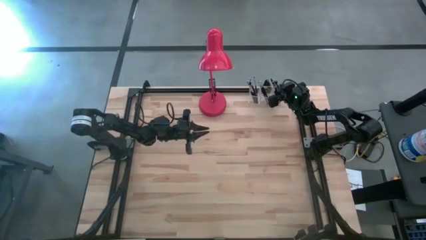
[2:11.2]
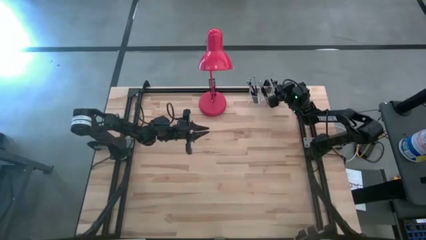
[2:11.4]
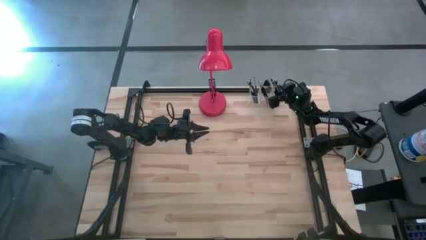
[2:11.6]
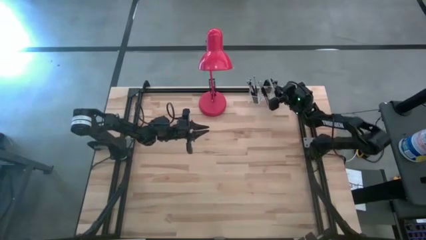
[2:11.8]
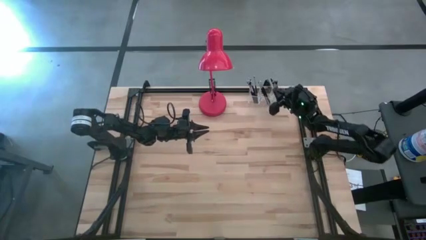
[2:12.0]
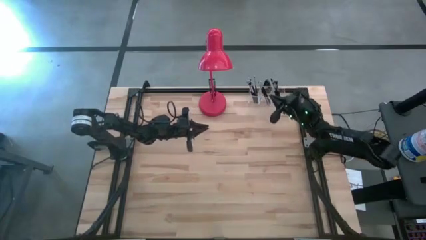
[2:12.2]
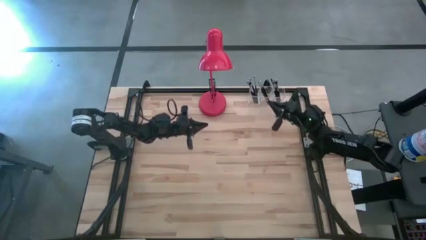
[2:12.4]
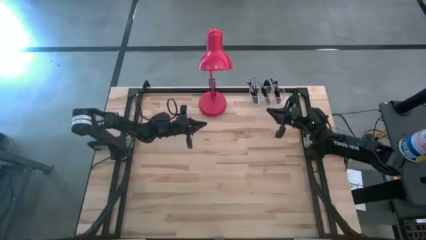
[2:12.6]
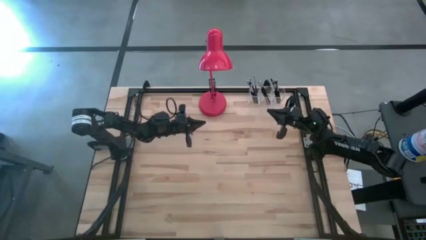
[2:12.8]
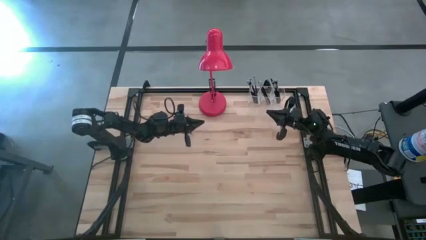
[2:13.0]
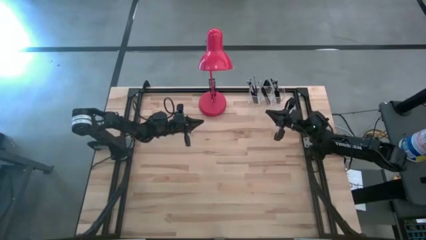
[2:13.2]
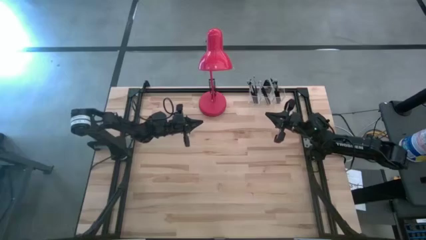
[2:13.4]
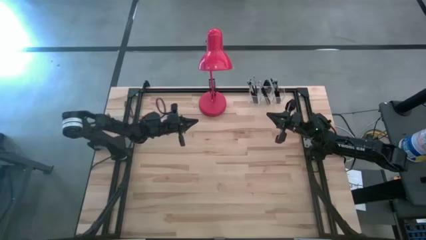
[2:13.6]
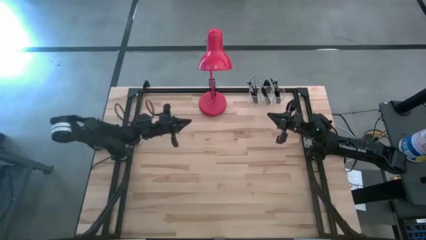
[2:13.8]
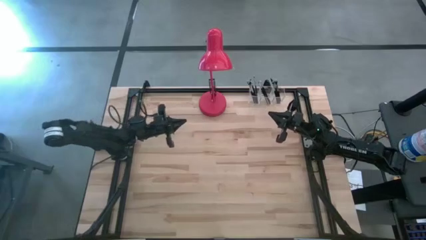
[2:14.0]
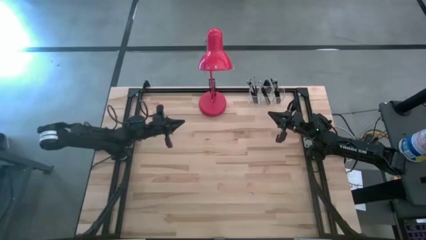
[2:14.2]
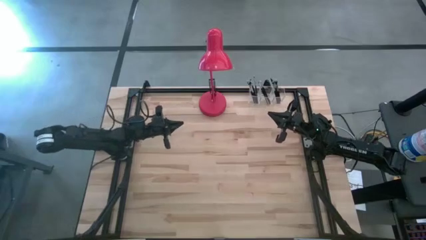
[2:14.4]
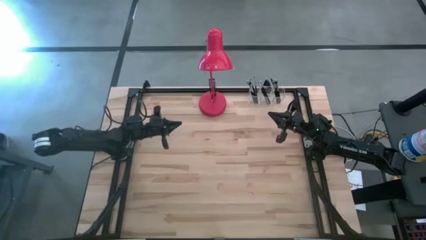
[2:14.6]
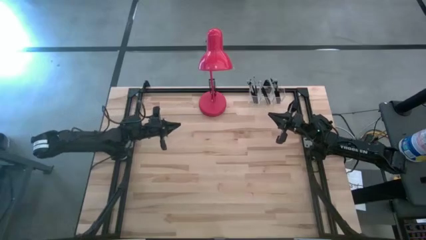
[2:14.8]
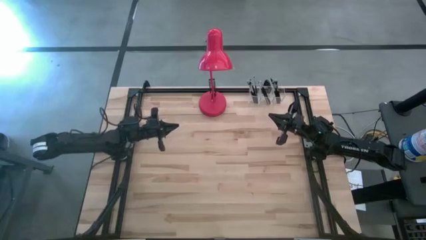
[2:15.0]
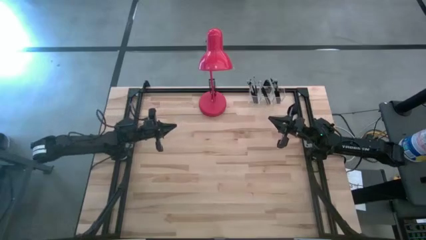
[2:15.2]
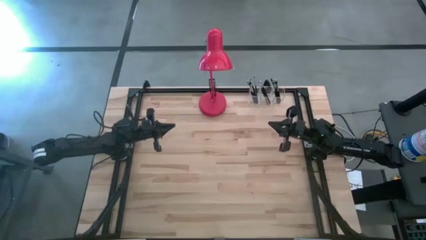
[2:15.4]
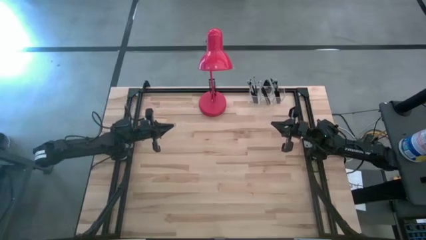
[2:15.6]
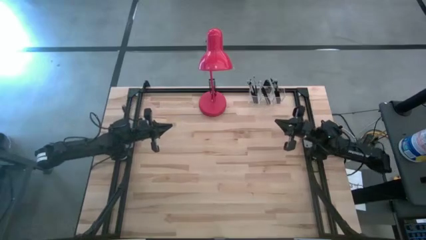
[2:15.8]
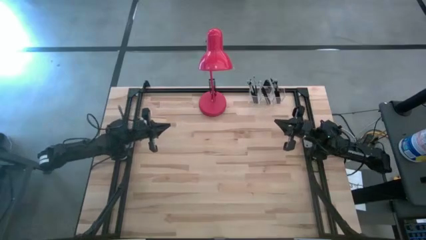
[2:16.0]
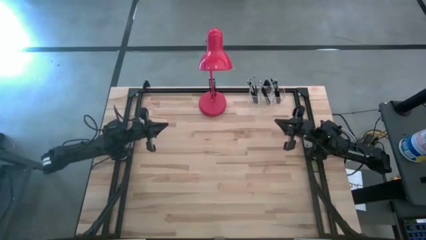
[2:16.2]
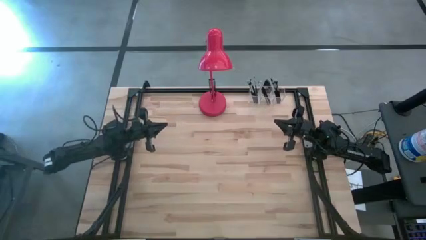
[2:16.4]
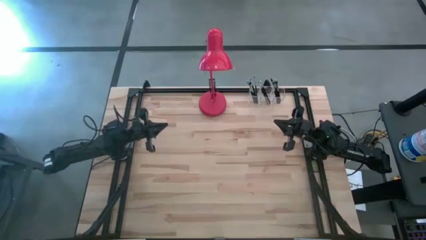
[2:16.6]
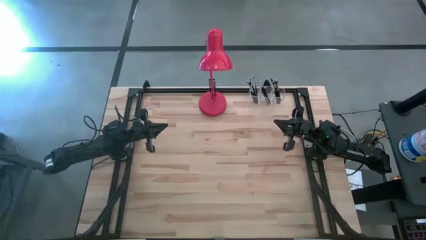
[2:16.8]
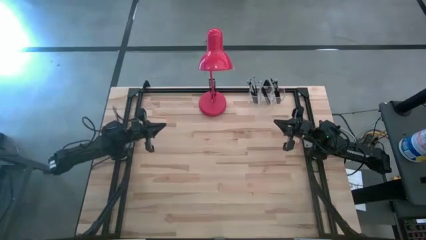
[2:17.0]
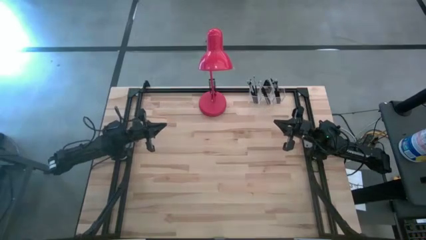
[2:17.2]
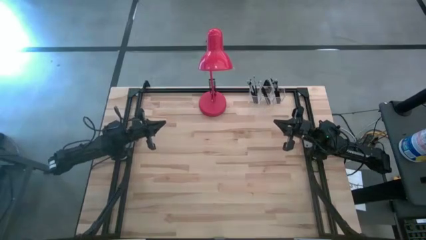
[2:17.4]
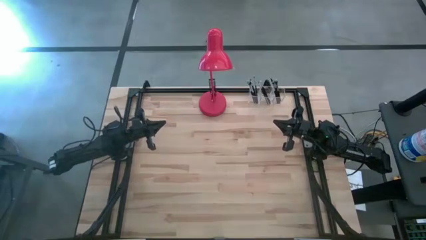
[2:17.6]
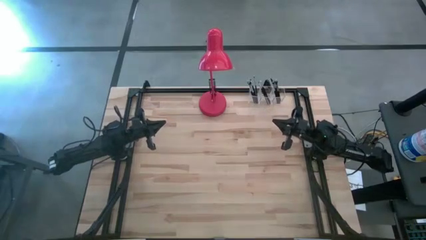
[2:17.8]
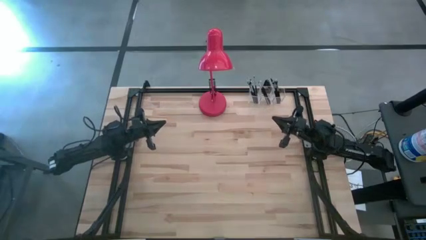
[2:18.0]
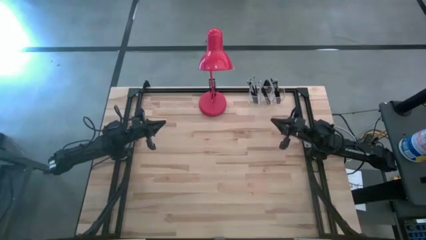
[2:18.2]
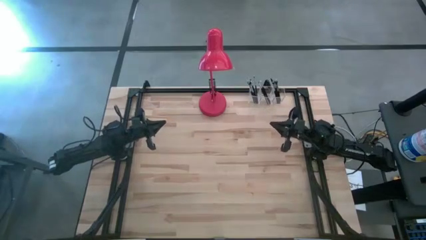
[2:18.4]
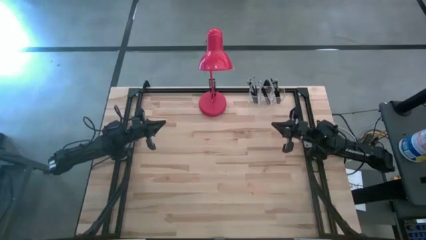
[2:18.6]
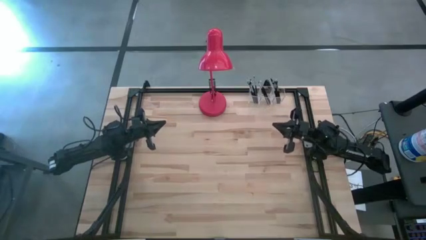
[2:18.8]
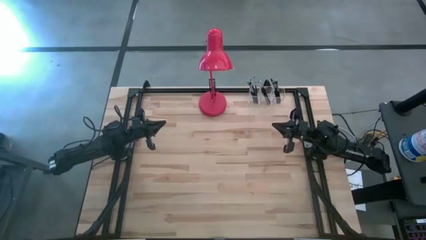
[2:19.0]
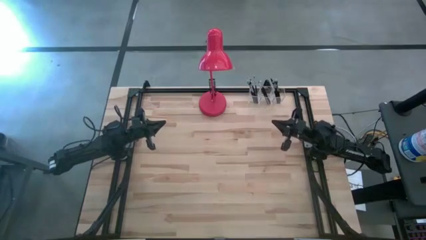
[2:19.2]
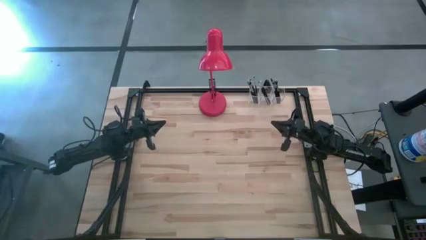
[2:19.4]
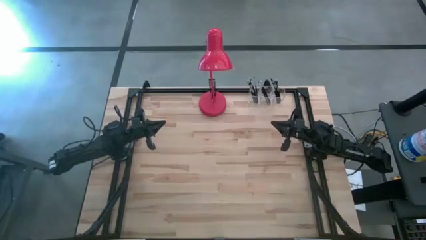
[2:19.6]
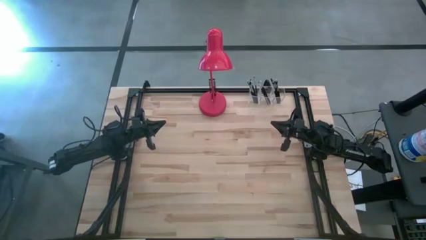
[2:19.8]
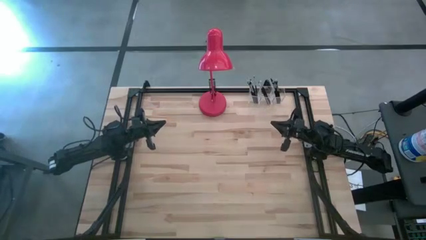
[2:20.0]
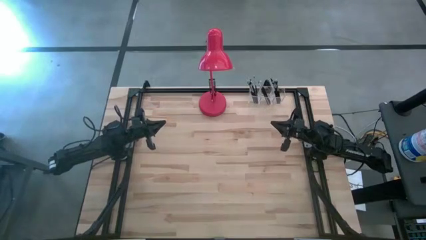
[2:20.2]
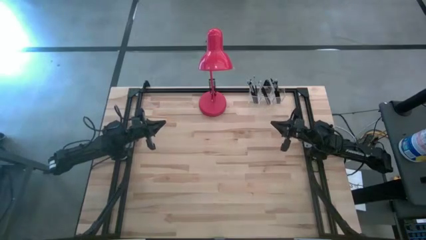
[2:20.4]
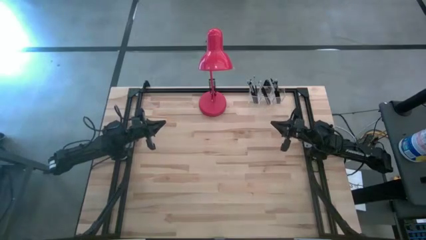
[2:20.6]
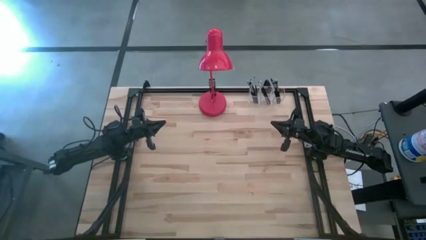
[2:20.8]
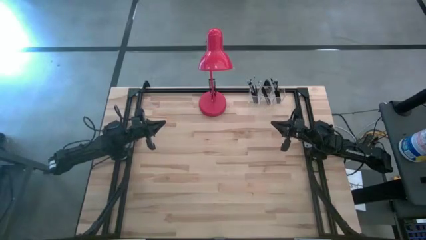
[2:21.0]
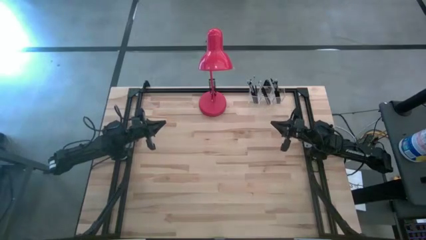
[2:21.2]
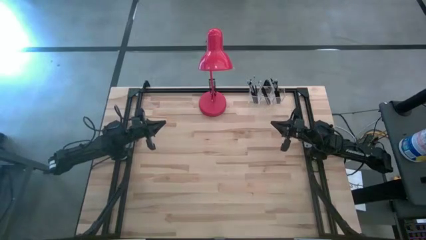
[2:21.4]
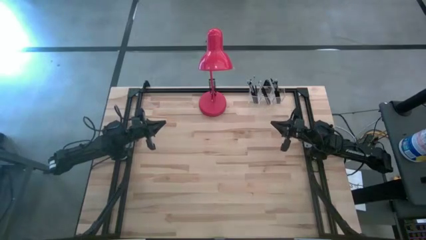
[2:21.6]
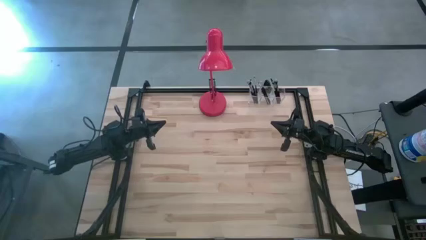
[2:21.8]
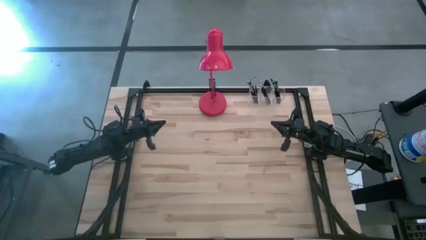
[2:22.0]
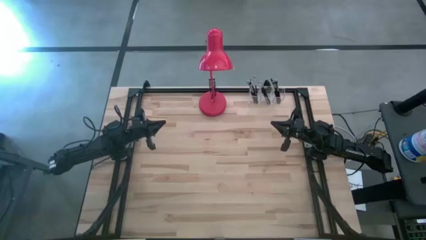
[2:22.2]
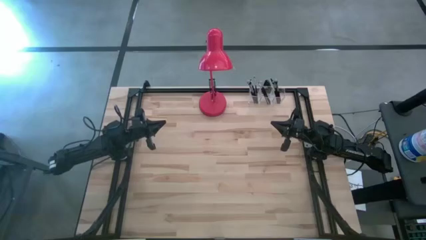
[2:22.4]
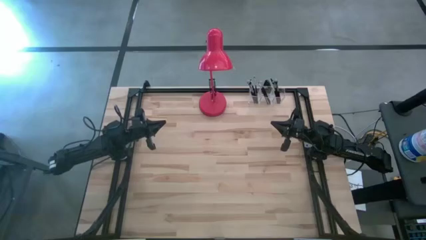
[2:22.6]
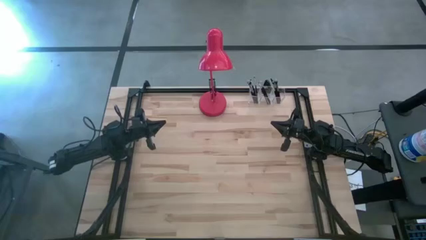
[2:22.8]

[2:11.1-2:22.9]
Task: Sort items
Return to Home Position

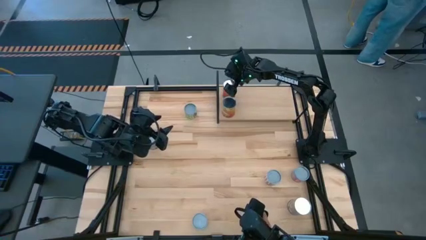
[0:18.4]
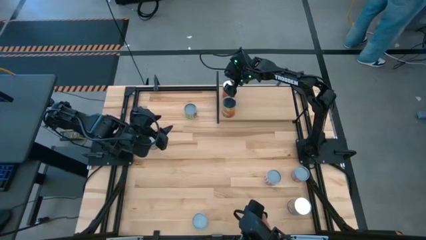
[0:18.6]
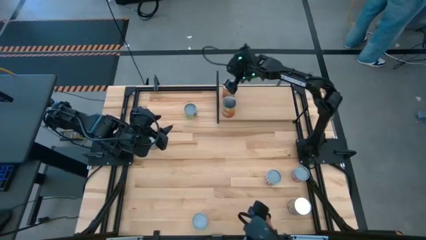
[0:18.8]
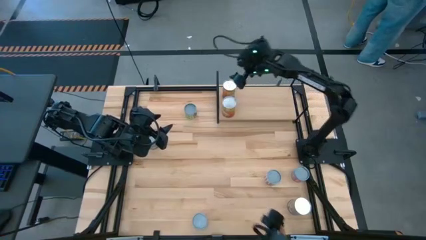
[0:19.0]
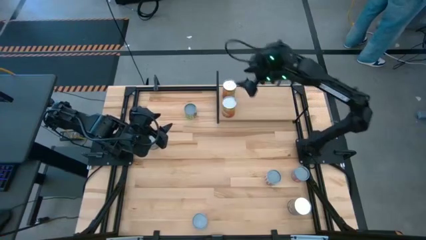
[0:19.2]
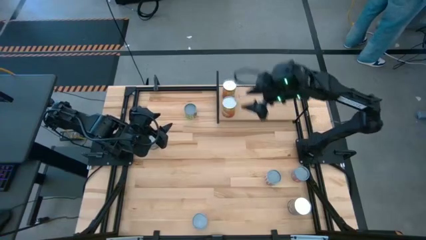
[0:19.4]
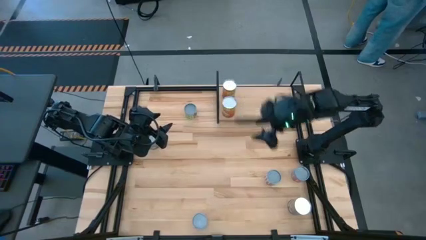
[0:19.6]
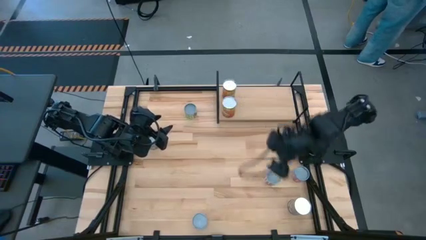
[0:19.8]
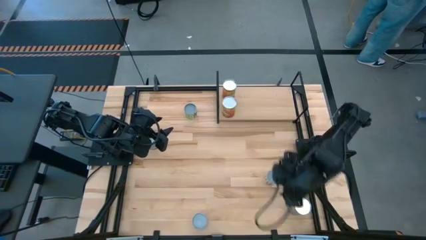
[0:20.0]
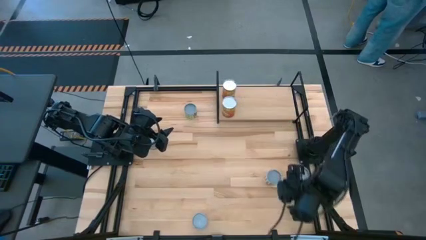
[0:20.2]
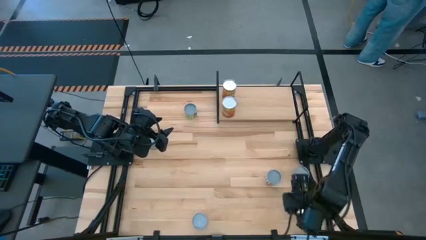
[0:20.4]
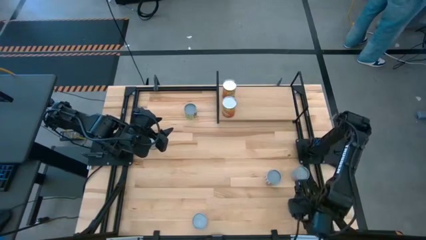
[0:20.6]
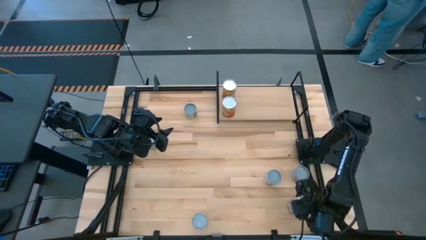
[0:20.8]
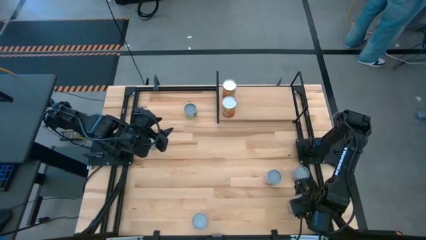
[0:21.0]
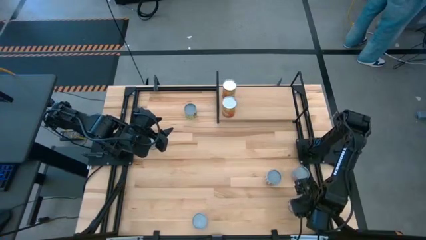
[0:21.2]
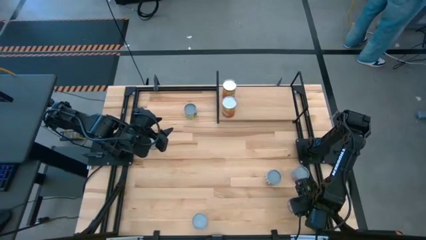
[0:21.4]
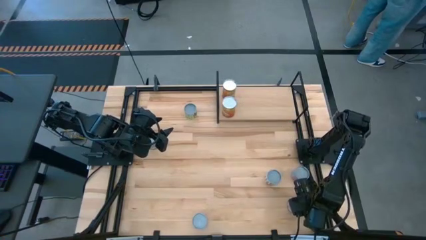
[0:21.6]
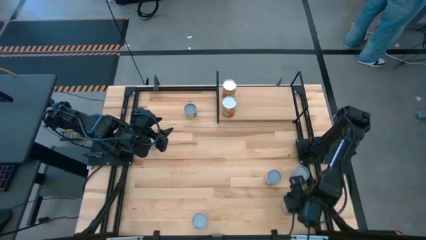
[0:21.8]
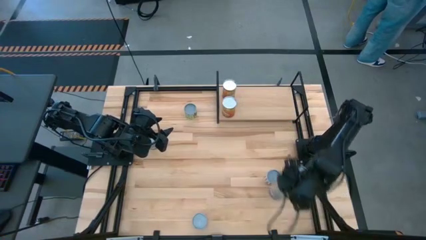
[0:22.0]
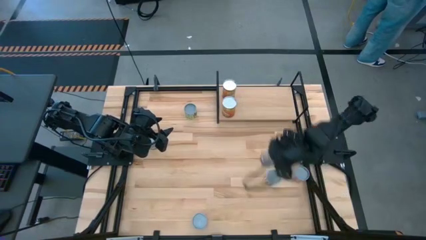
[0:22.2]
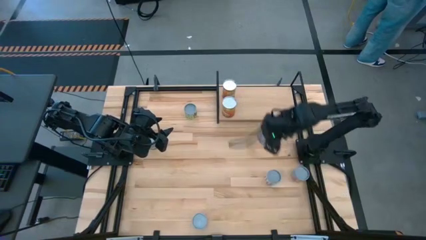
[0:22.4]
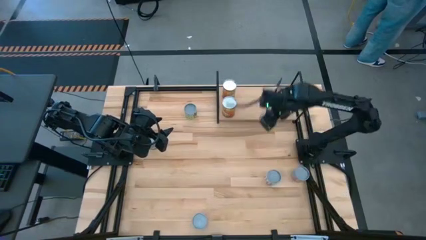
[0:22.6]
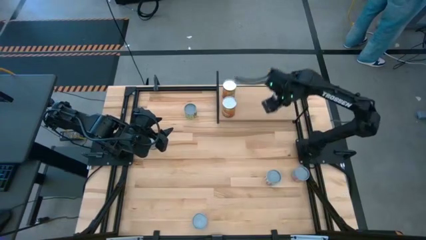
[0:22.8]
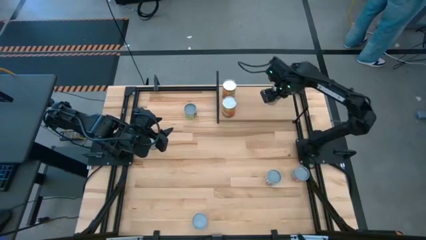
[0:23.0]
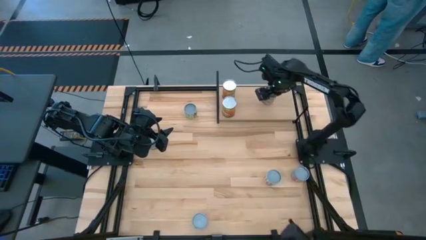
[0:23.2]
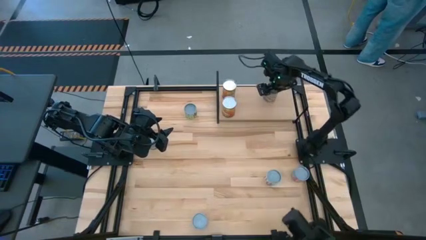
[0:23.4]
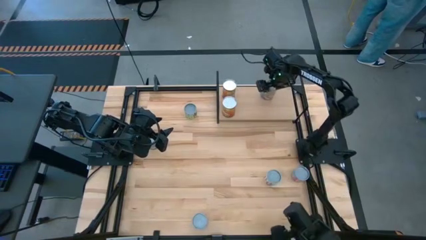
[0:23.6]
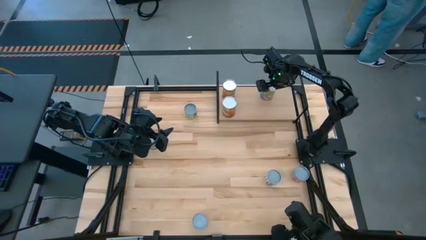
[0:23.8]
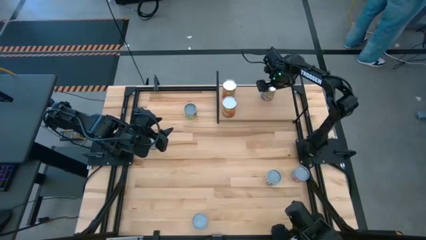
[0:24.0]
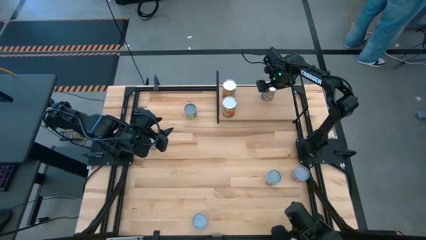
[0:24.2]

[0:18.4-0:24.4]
Task: Pick and place cans onto a shelf
Put the bottom big blue can on the shelf
